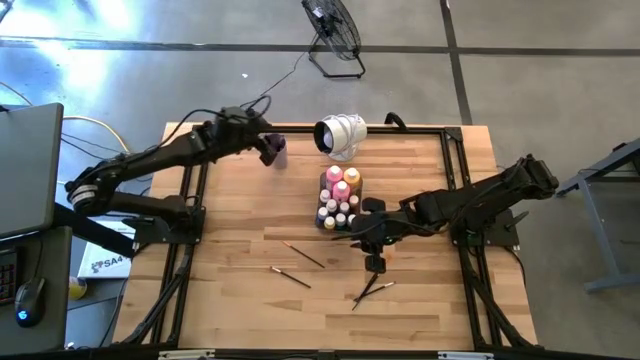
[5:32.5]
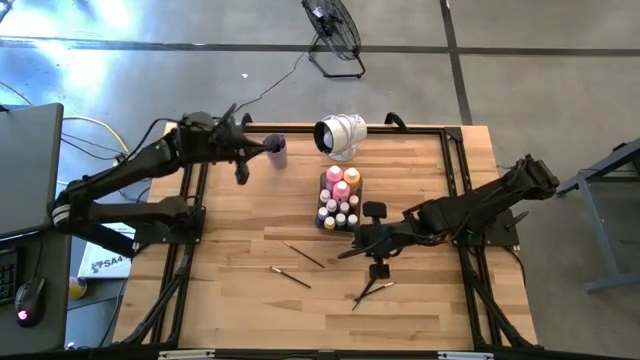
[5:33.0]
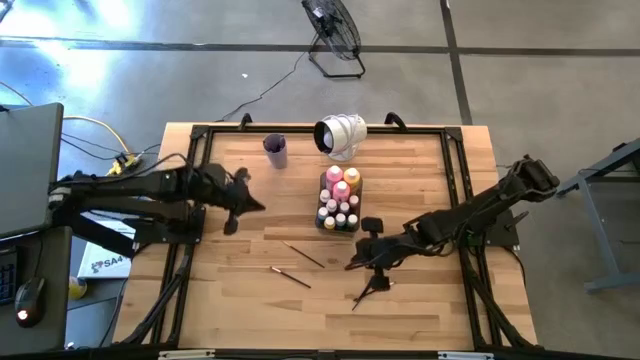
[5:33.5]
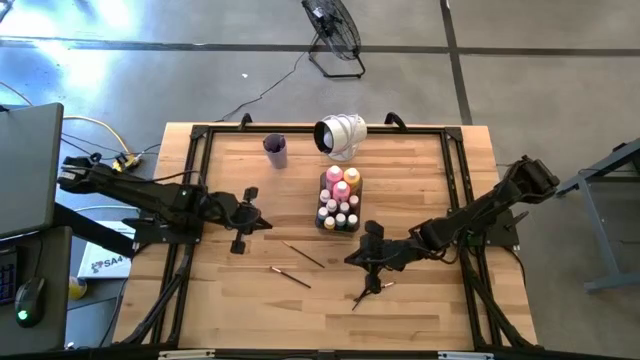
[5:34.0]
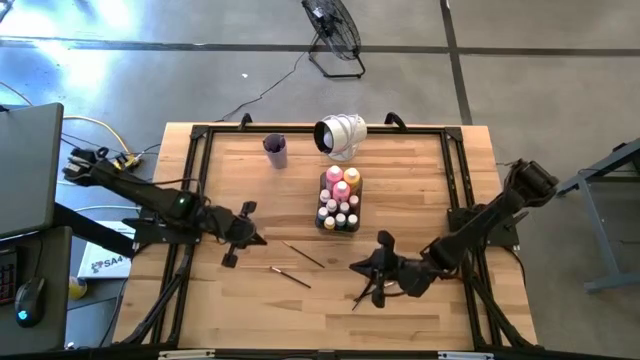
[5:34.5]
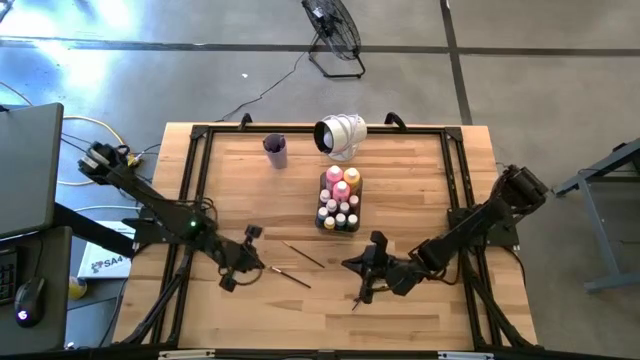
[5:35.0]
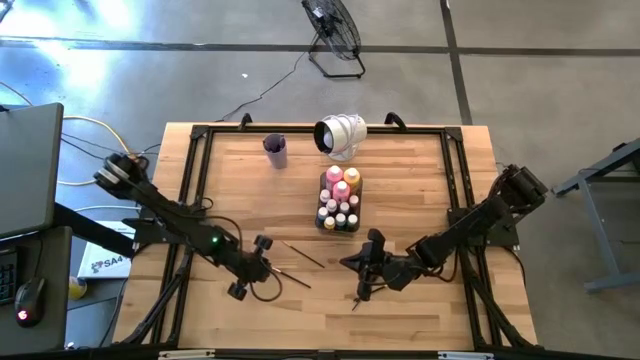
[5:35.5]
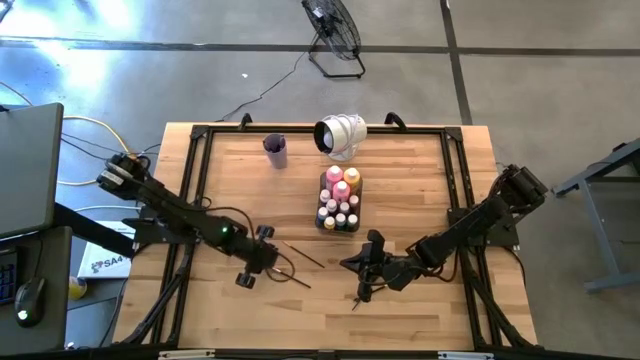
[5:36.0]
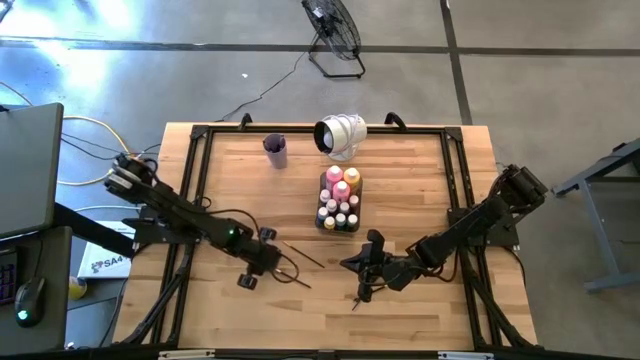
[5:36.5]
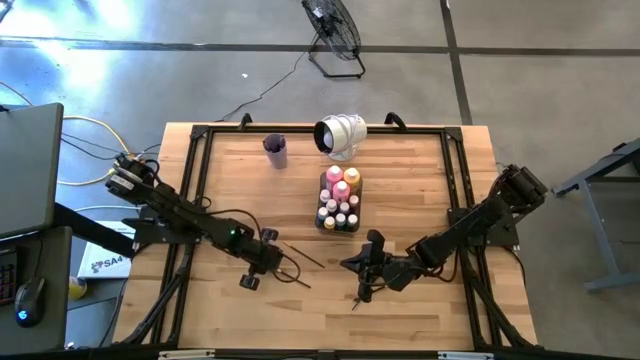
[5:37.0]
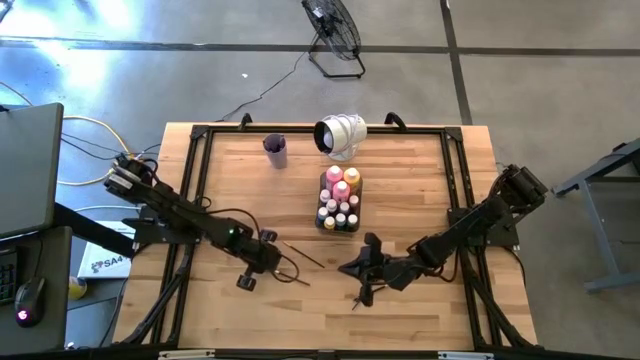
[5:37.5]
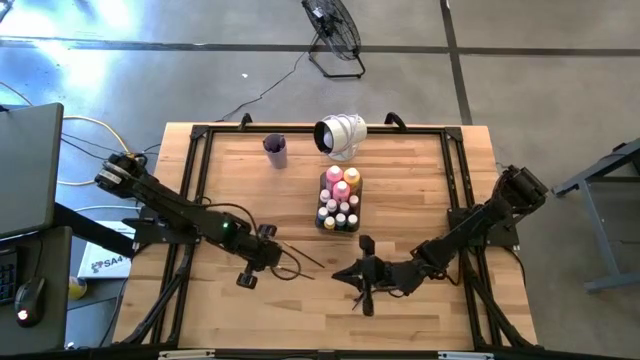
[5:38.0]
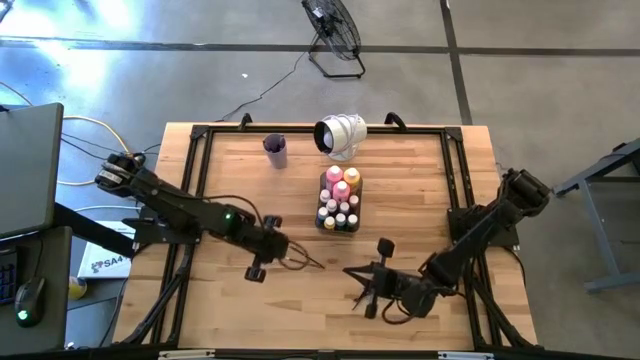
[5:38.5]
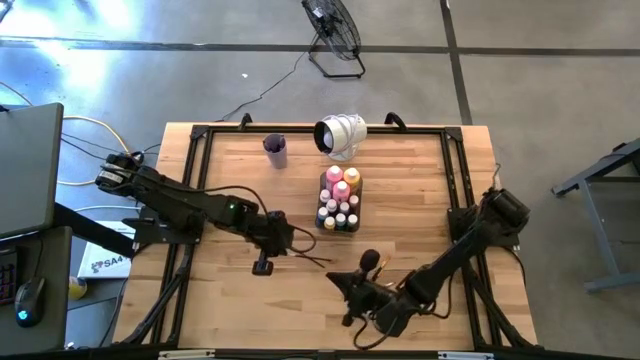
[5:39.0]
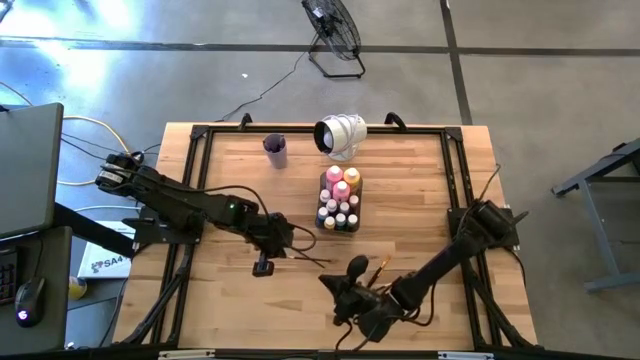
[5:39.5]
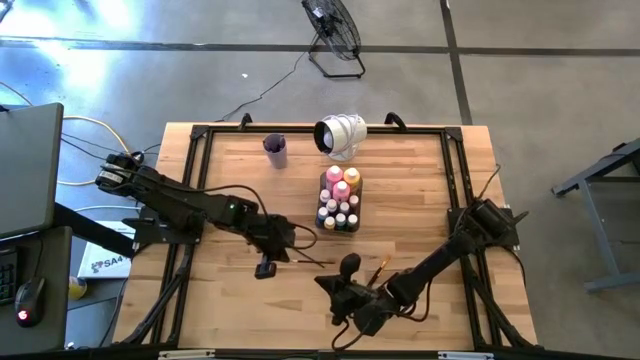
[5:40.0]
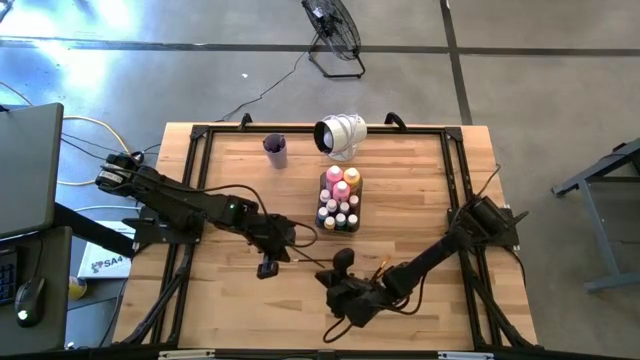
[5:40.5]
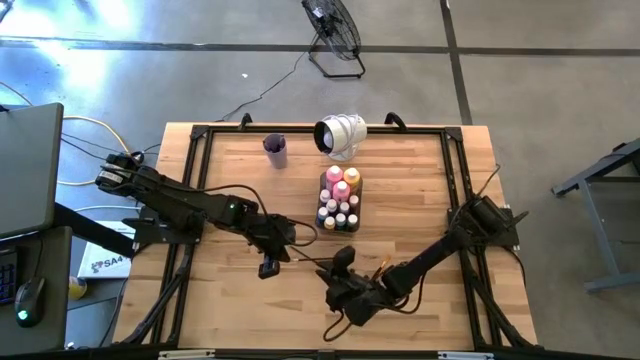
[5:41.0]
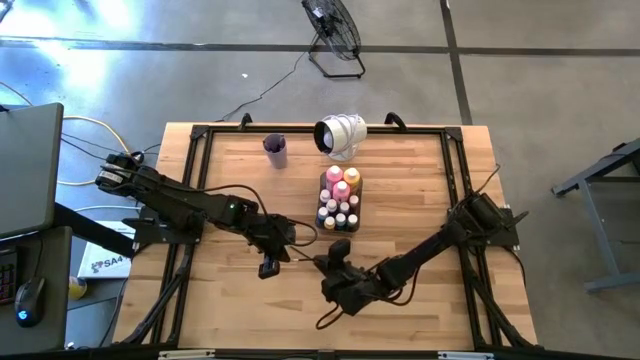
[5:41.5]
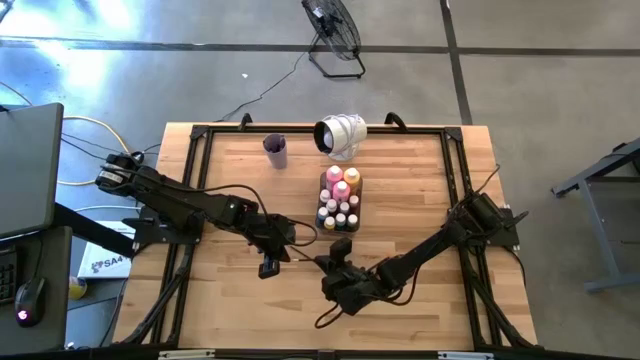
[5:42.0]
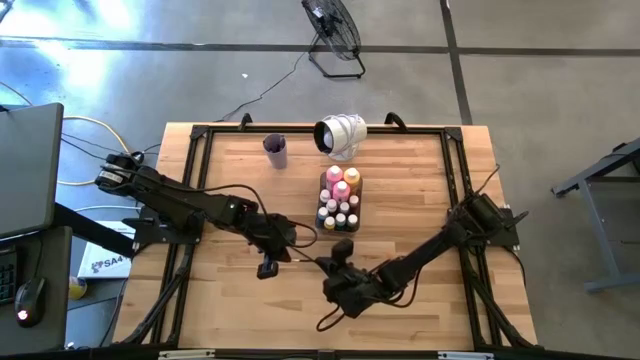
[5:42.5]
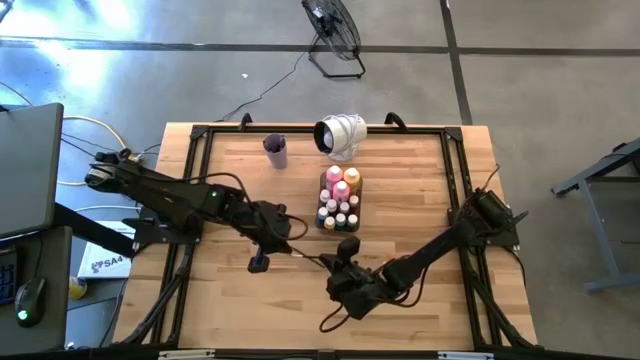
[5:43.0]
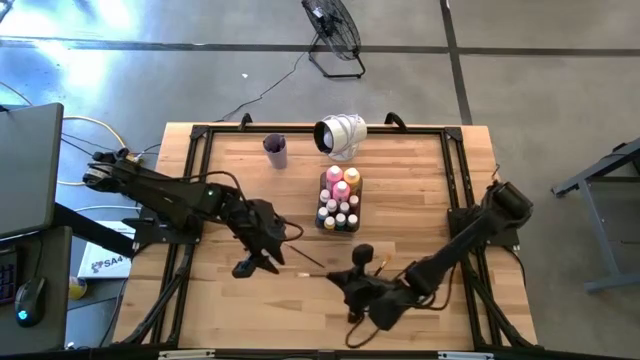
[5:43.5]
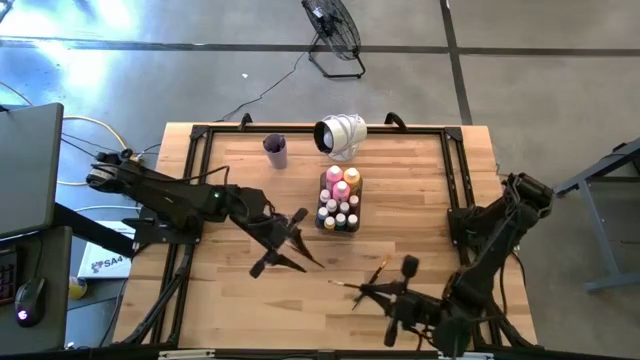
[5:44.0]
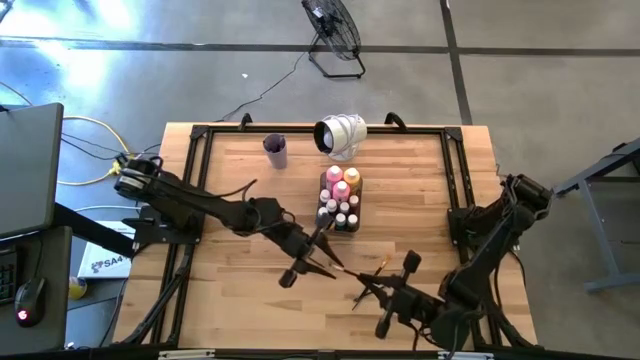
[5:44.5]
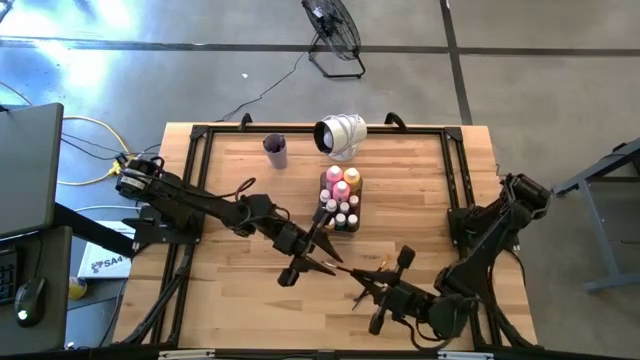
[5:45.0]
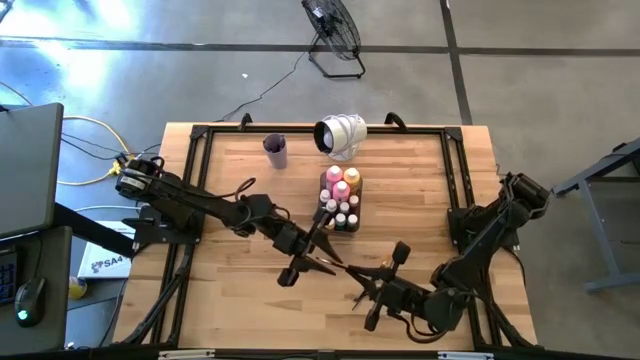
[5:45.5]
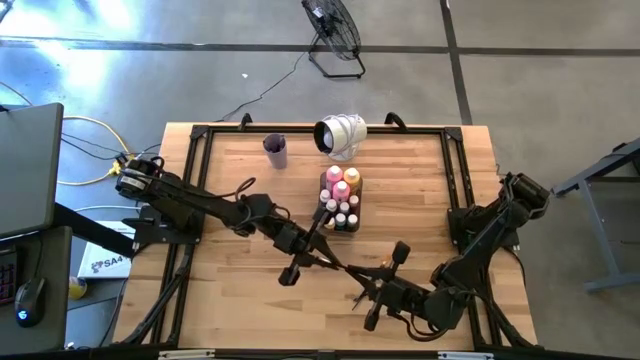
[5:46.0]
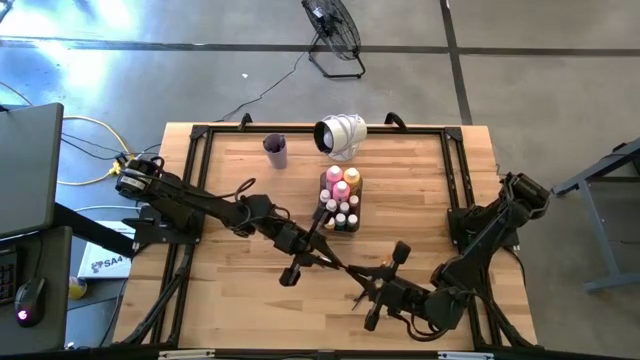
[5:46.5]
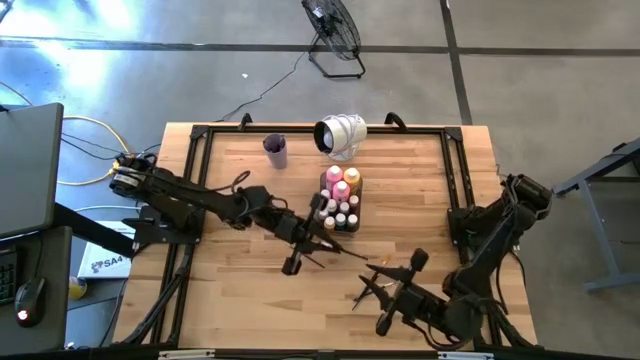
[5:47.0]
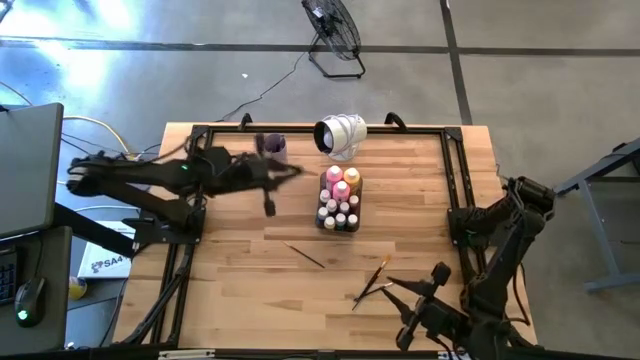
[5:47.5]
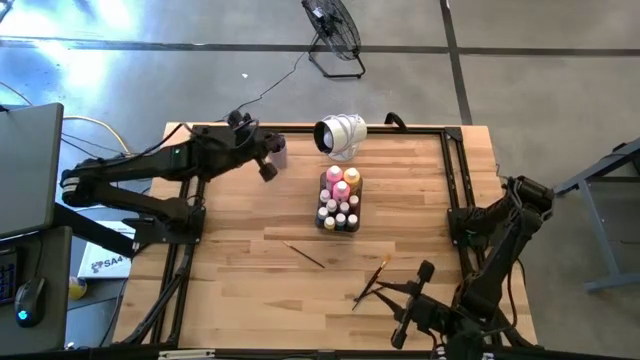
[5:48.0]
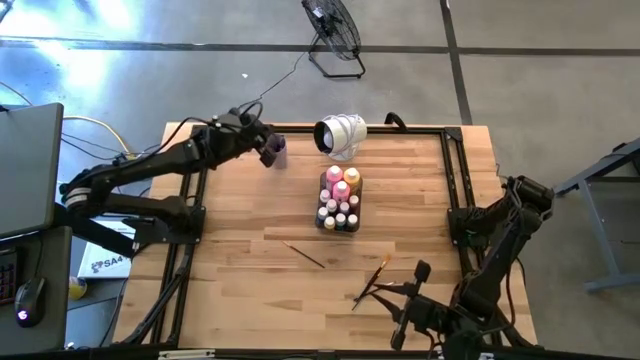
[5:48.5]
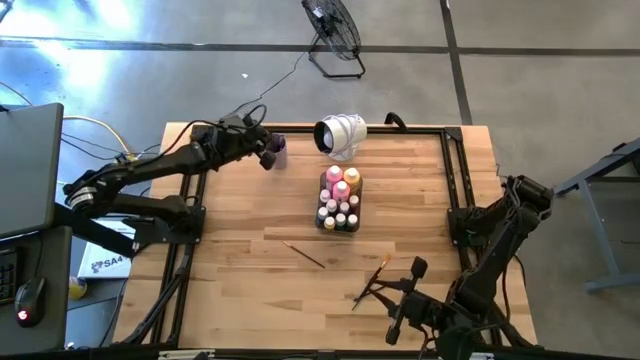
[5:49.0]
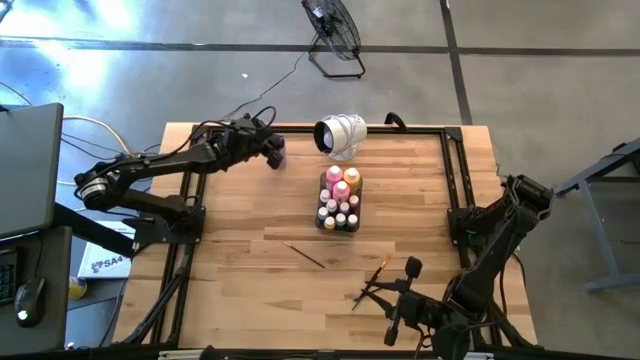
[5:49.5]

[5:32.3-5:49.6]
Task: Pick & Place Paint Supplies
Put the silver paint brush into the violet cup

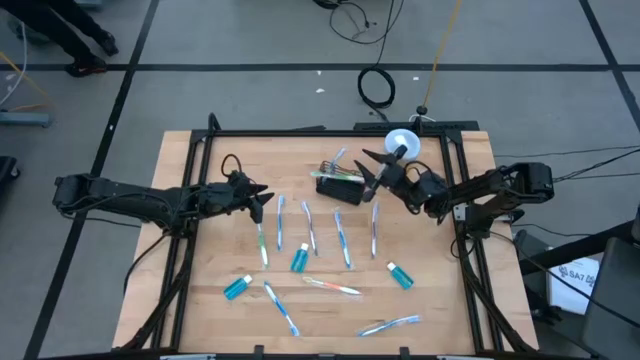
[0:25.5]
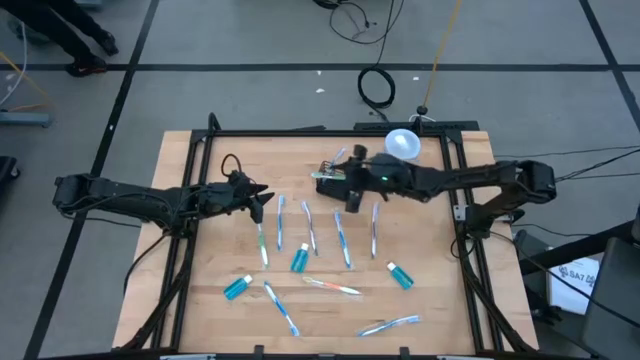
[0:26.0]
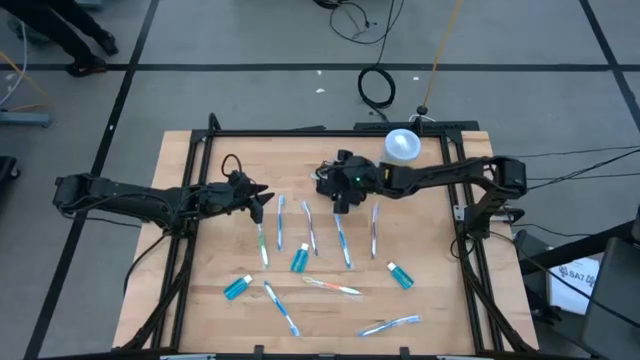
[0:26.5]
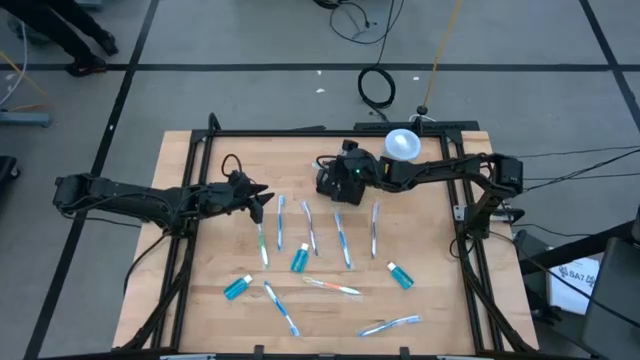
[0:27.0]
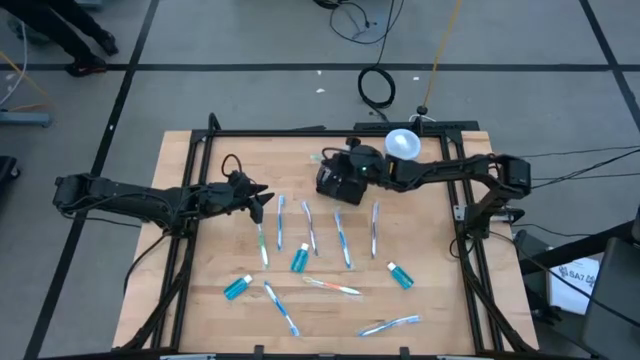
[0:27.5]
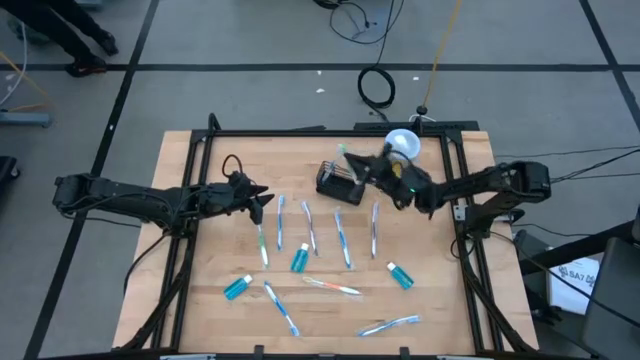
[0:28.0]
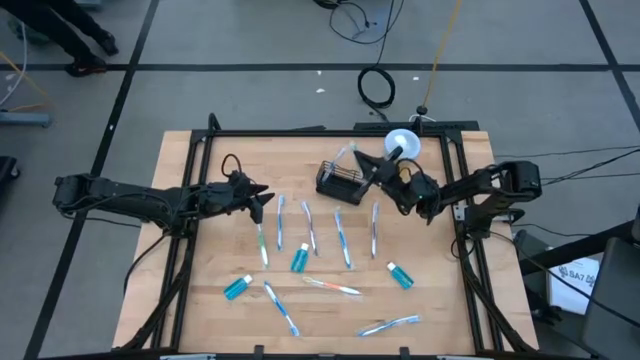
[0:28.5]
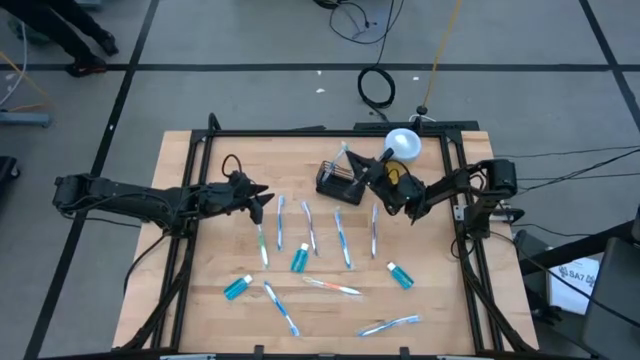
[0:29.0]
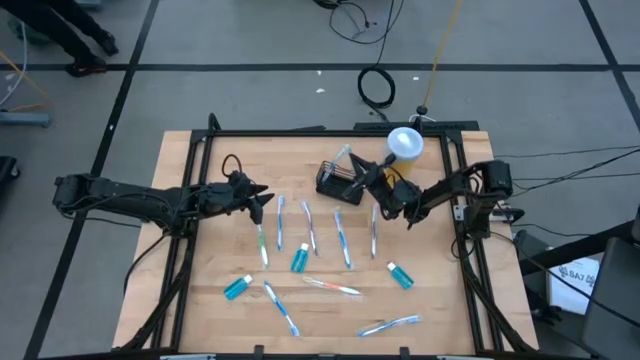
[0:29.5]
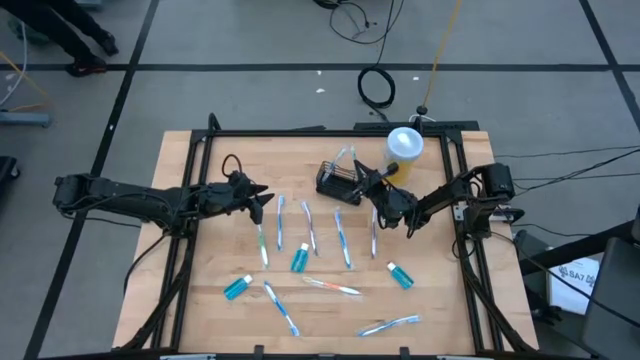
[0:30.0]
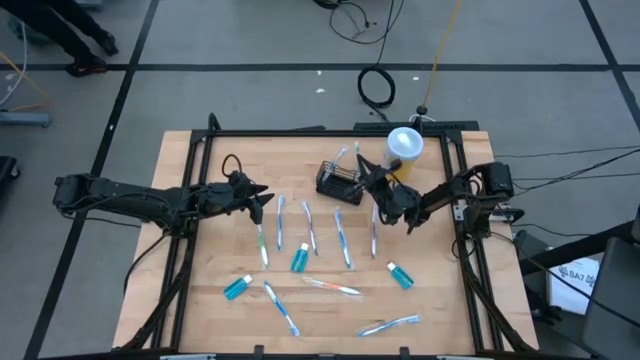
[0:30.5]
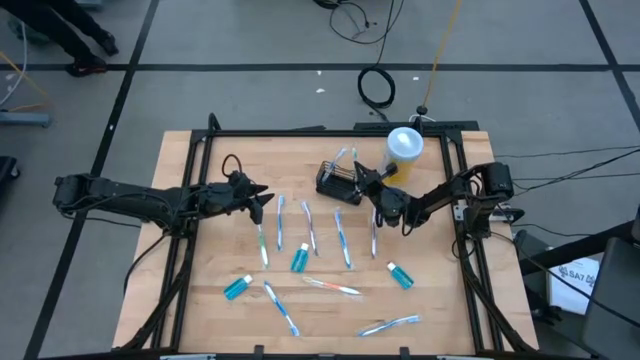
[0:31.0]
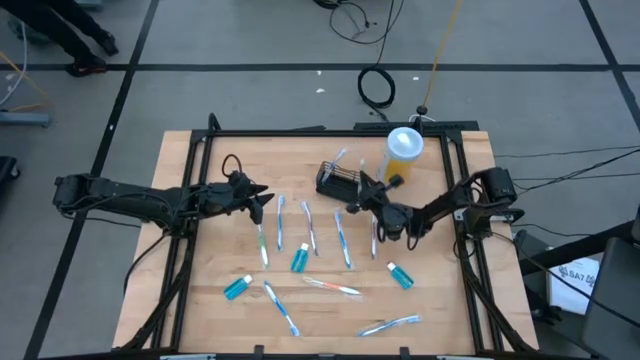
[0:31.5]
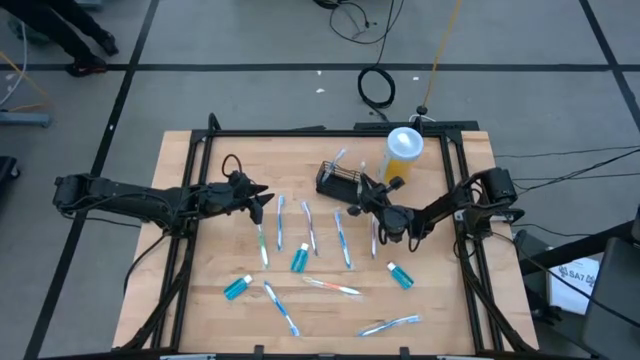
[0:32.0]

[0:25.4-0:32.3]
Task: Pick & Place toothbrushing station
Put the green toothbrush into the black organizer
